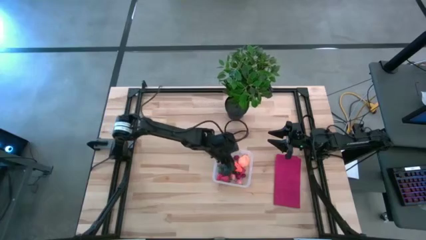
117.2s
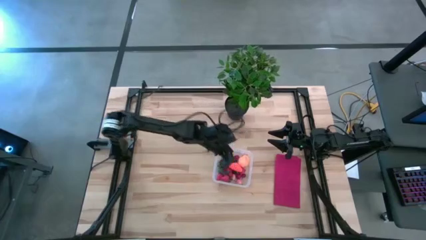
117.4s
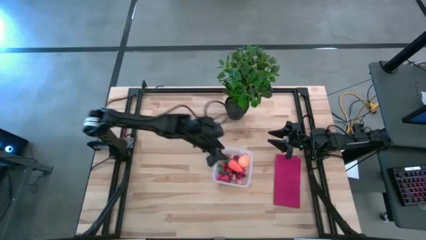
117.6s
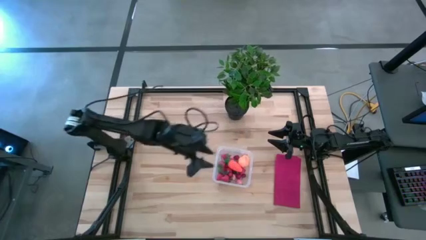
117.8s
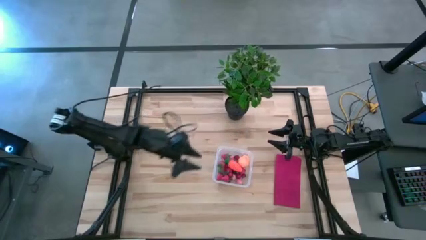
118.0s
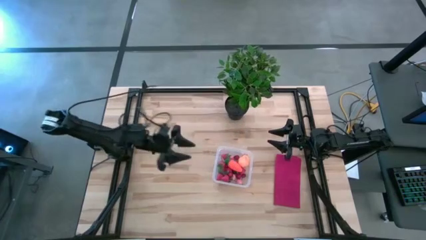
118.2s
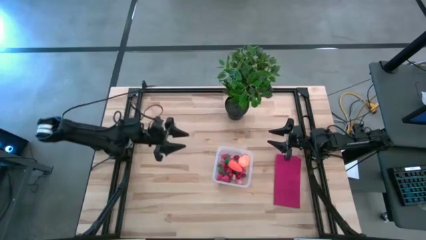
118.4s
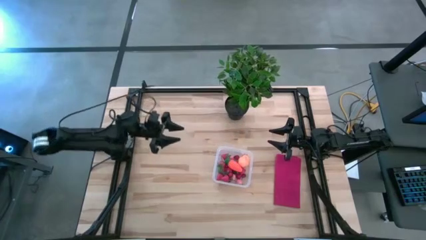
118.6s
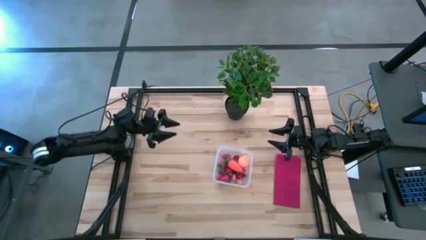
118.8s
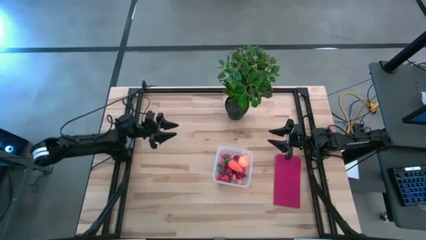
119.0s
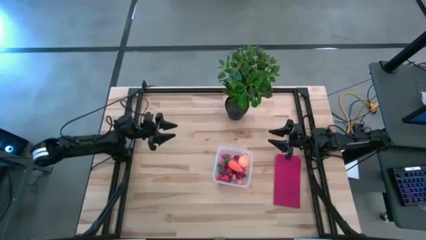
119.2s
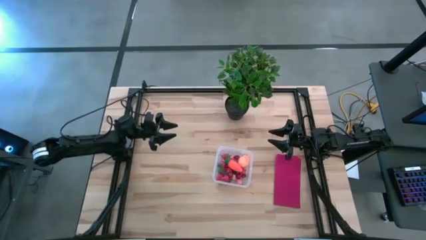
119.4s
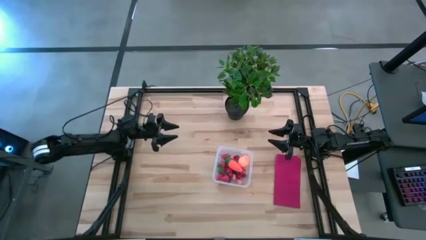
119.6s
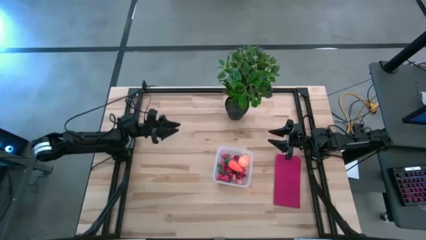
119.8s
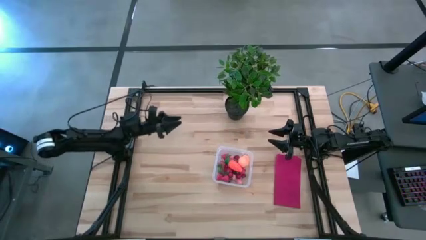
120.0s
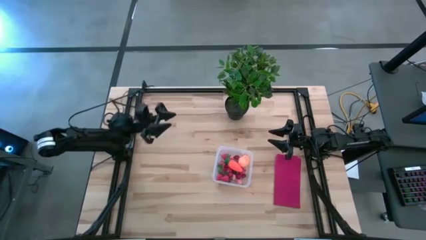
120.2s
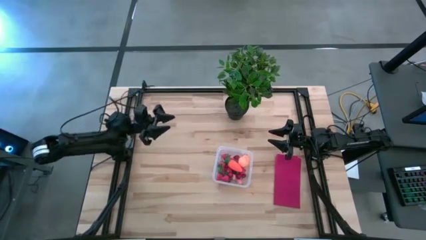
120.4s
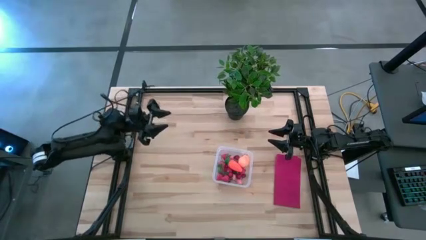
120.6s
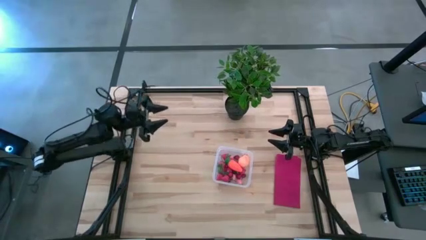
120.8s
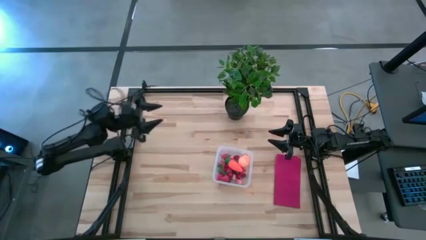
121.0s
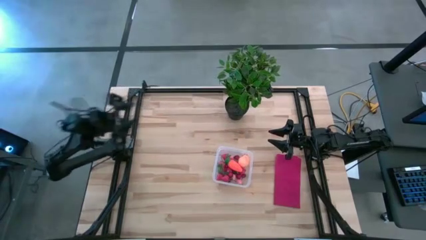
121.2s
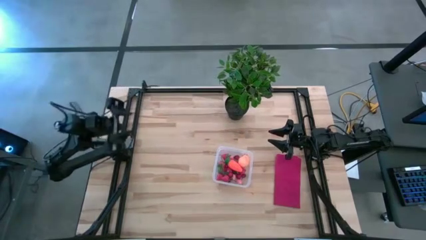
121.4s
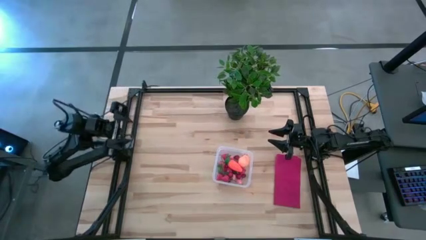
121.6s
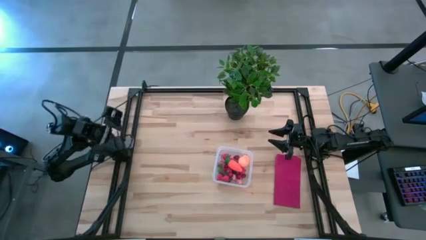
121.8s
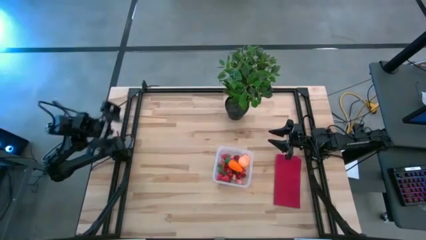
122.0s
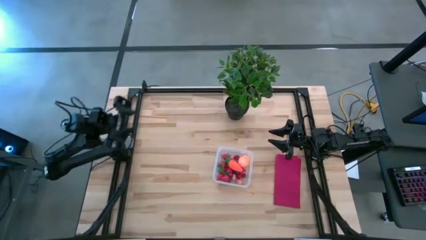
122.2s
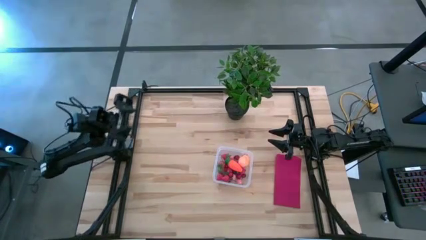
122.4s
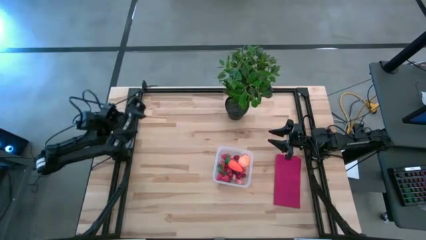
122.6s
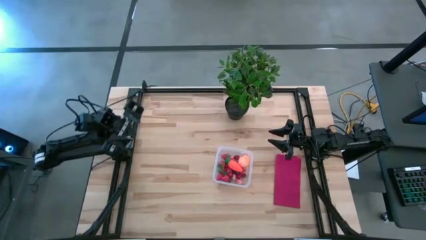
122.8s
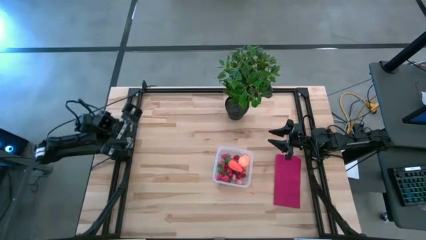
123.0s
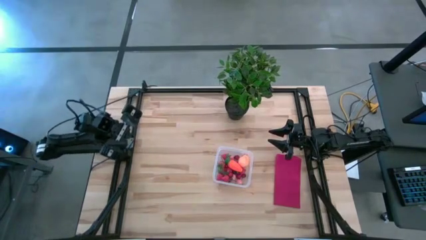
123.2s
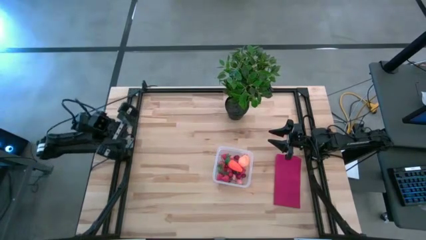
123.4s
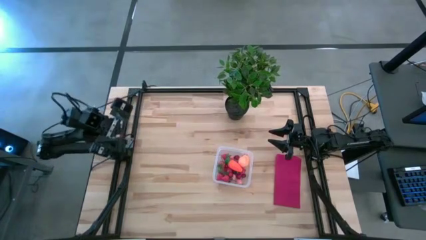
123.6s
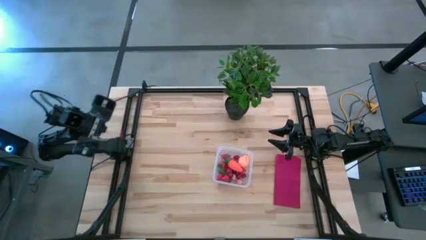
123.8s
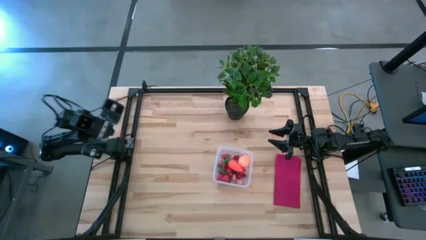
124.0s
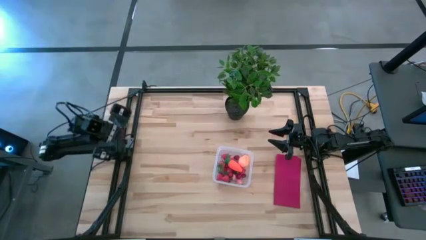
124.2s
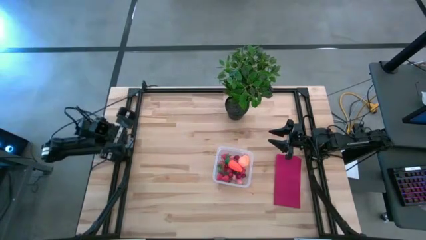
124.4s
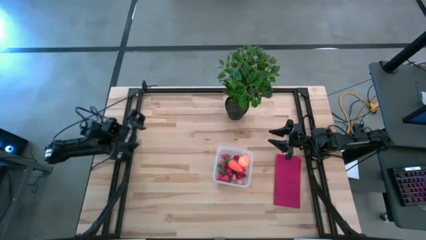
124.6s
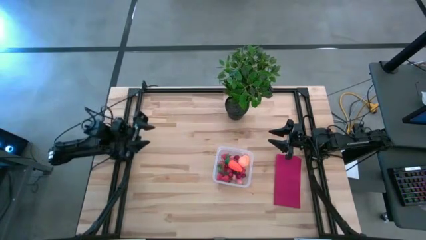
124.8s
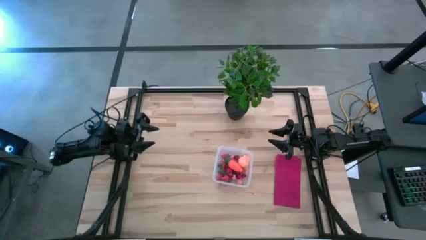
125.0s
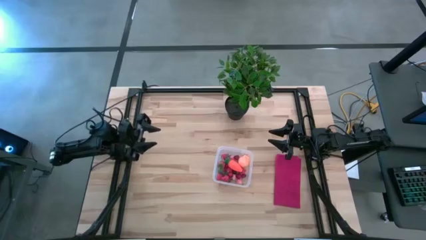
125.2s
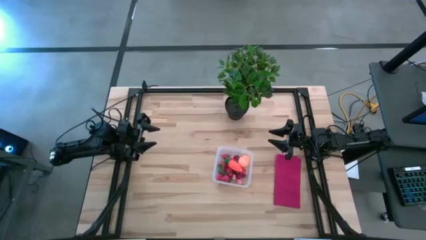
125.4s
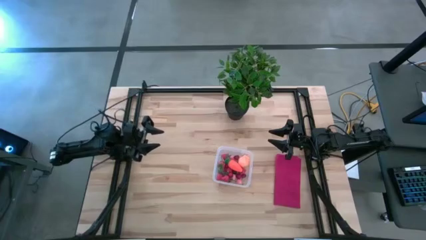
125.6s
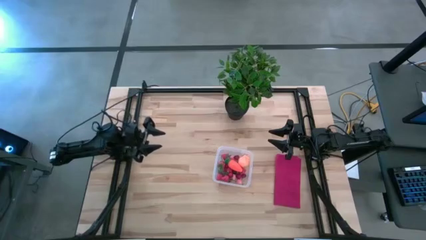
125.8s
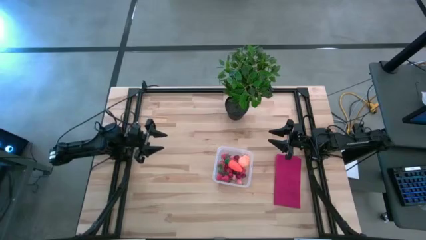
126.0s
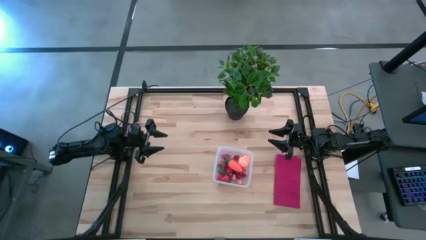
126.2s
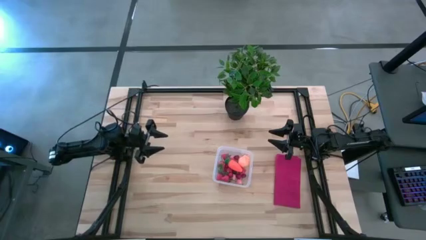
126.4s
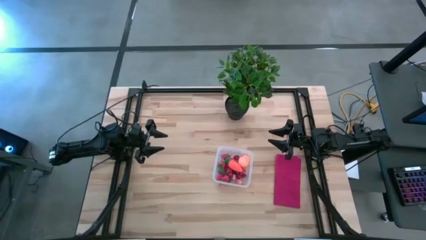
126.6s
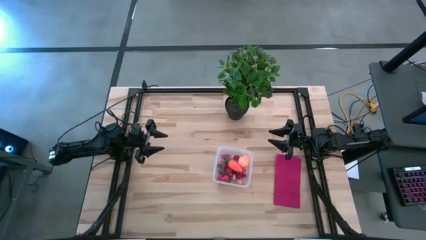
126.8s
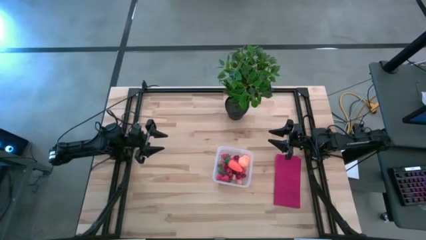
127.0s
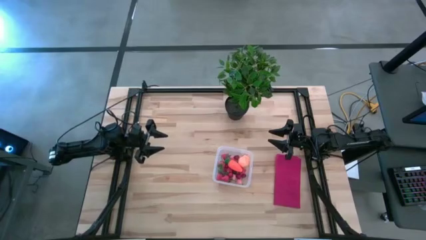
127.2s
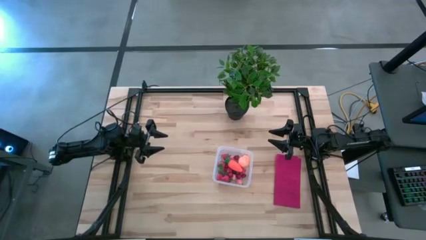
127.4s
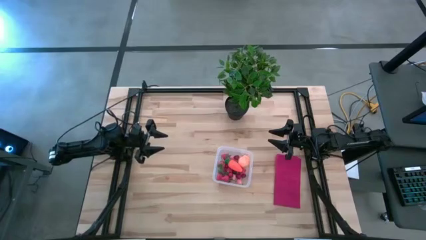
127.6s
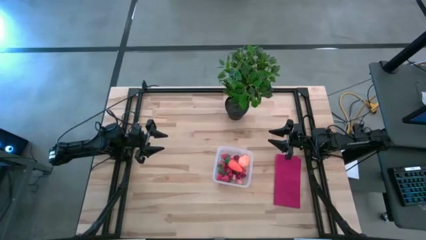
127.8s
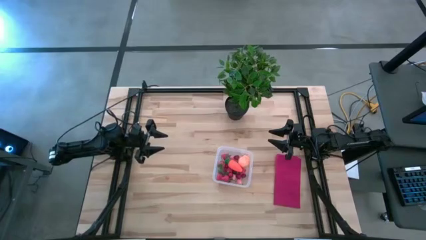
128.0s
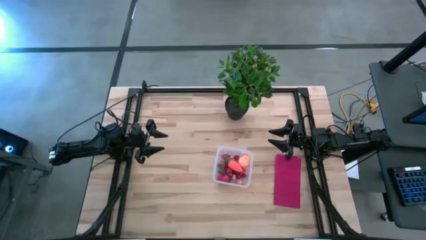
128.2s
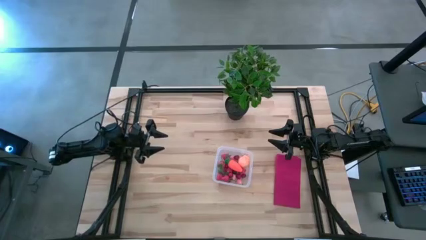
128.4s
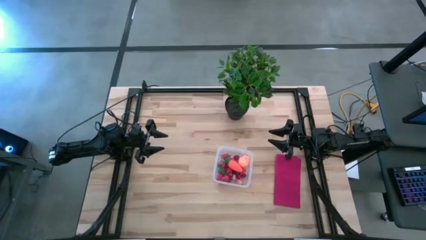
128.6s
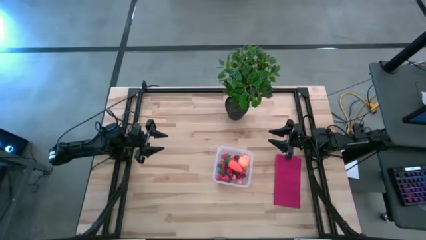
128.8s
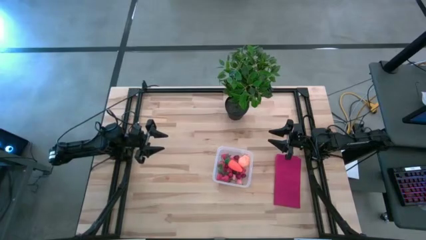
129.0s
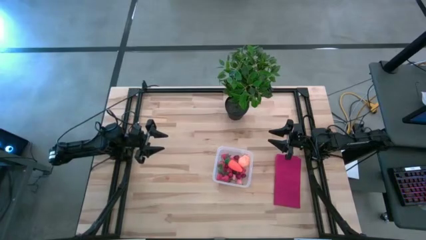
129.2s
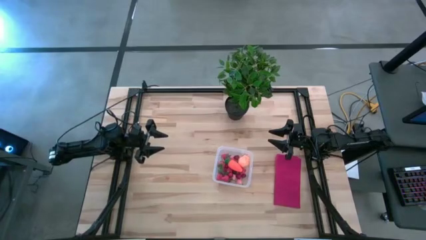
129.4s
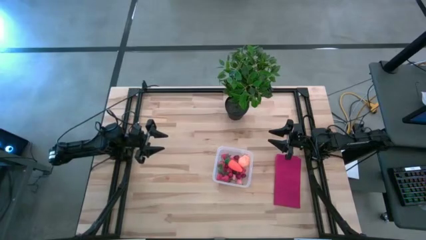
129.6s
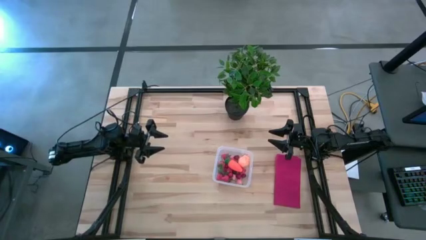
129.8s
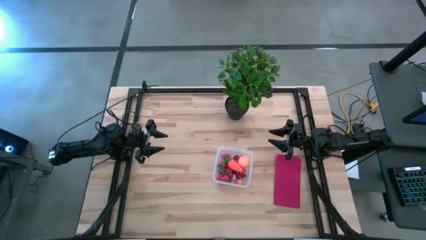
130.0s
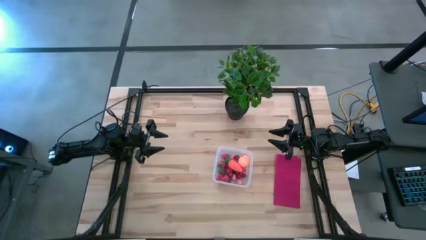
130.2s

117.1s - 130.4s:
Task: Pick and placing Produce into tupperware
Return to Home Position
